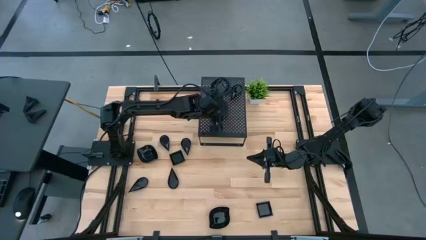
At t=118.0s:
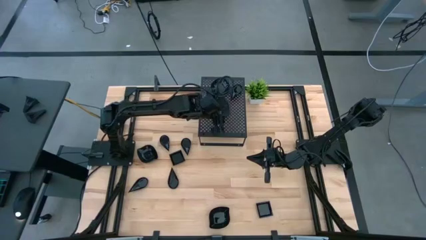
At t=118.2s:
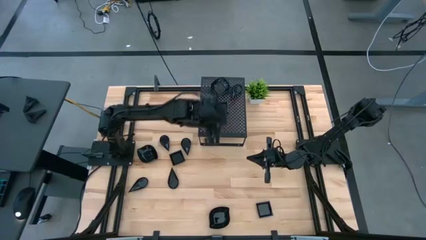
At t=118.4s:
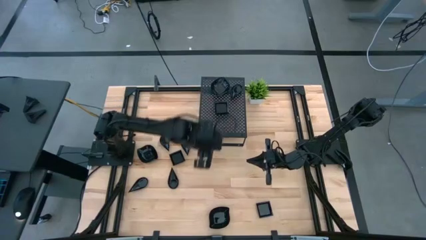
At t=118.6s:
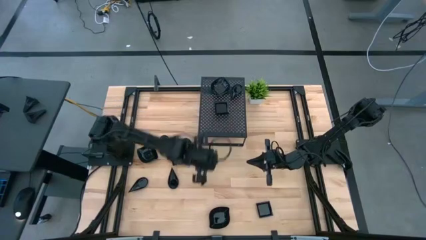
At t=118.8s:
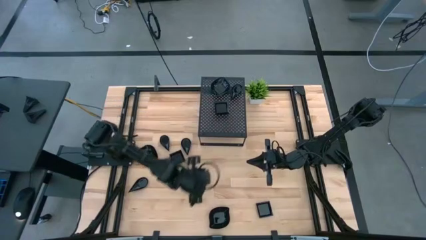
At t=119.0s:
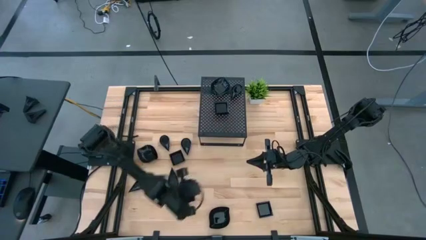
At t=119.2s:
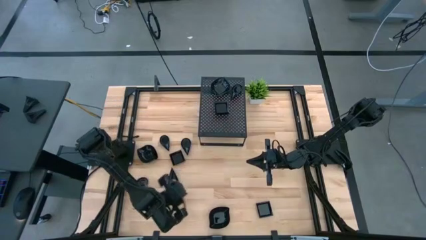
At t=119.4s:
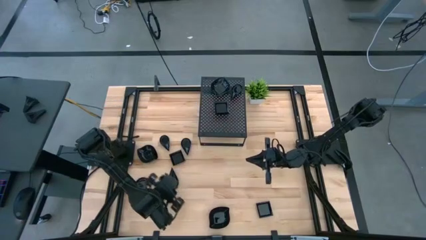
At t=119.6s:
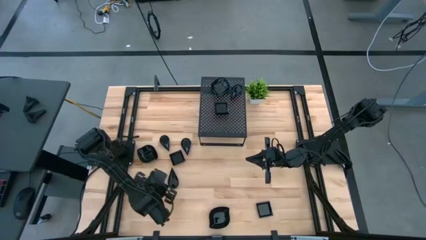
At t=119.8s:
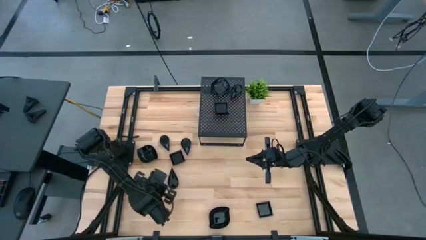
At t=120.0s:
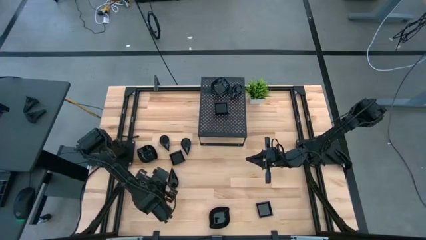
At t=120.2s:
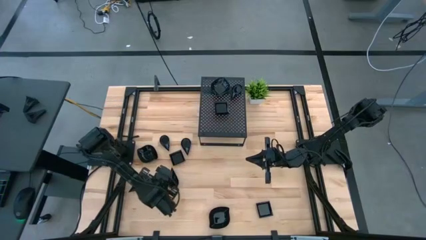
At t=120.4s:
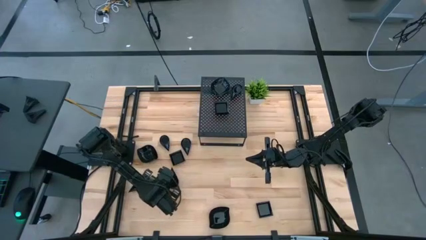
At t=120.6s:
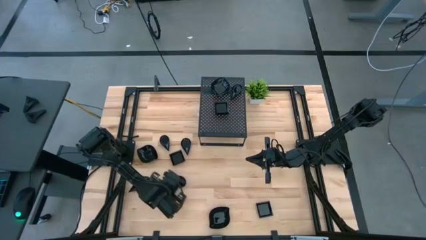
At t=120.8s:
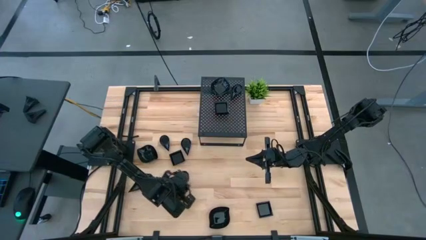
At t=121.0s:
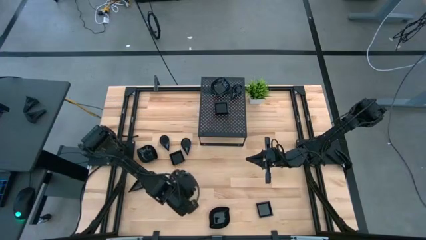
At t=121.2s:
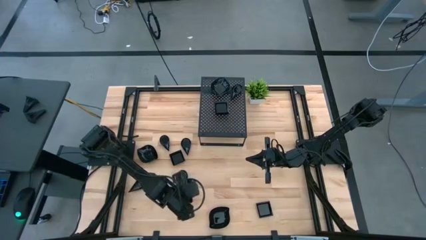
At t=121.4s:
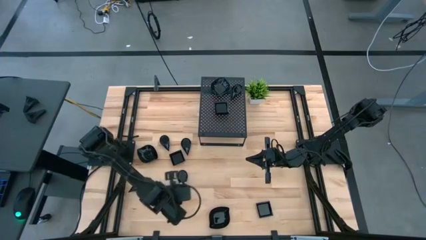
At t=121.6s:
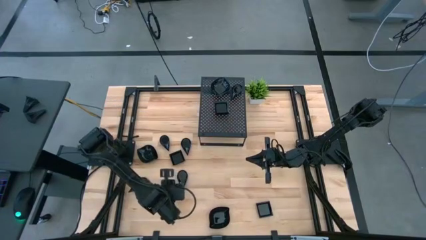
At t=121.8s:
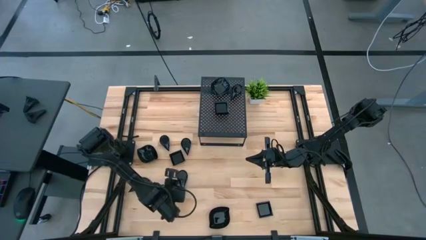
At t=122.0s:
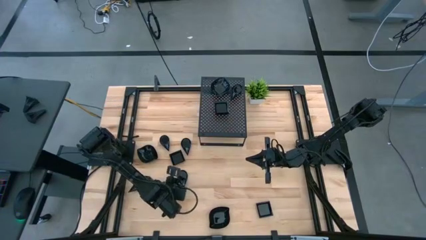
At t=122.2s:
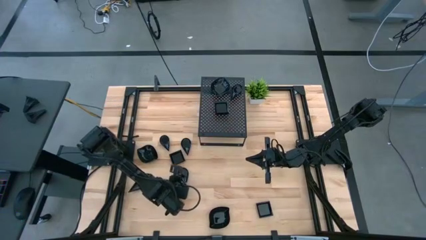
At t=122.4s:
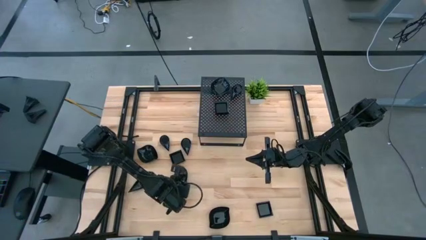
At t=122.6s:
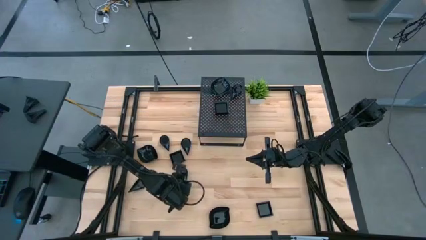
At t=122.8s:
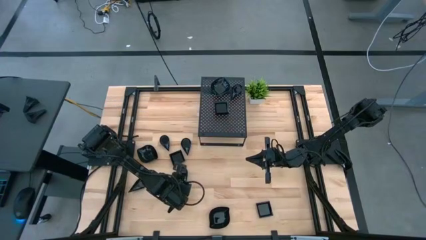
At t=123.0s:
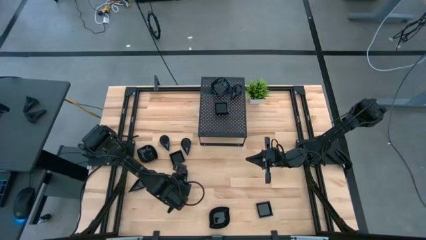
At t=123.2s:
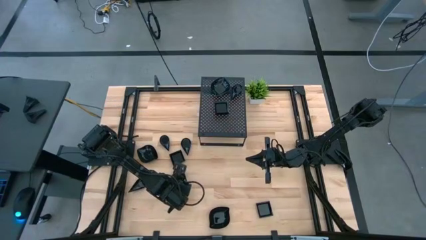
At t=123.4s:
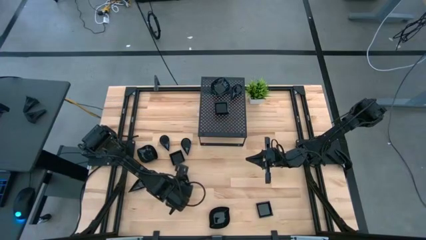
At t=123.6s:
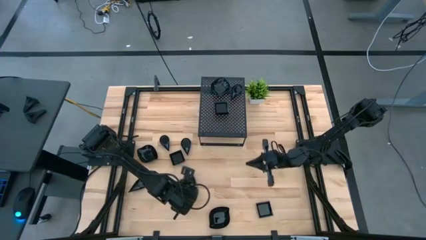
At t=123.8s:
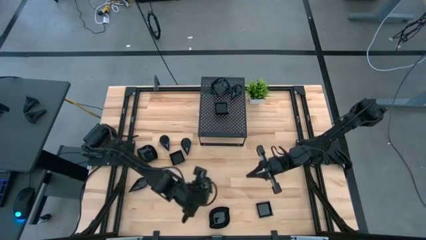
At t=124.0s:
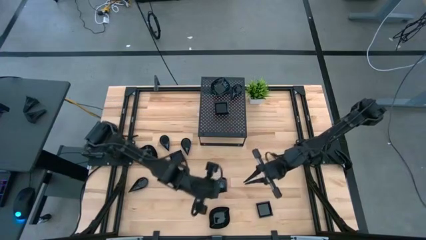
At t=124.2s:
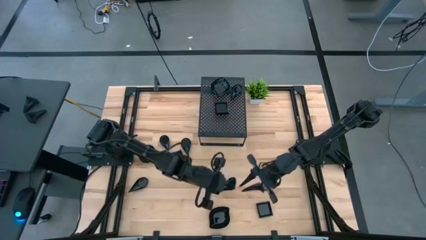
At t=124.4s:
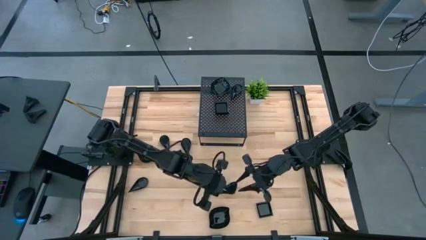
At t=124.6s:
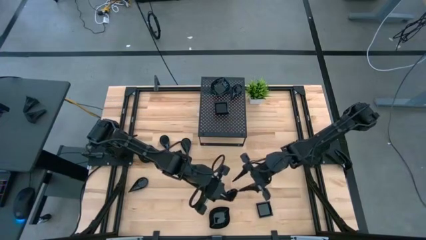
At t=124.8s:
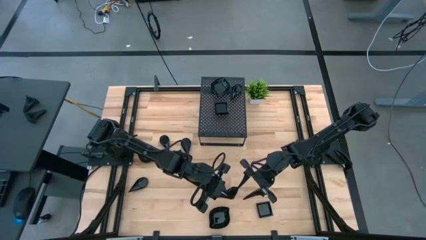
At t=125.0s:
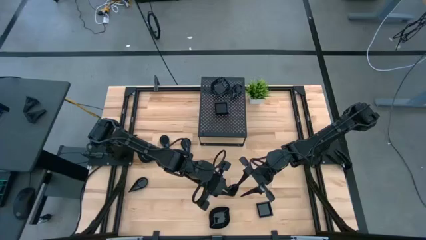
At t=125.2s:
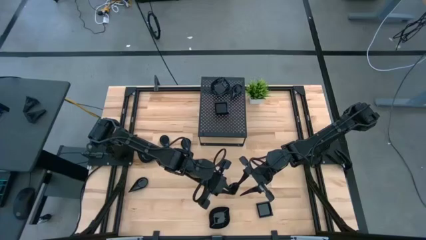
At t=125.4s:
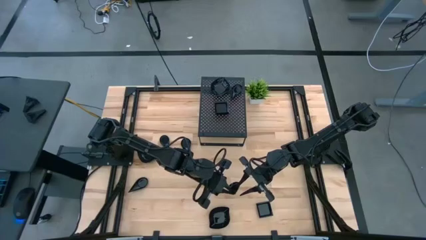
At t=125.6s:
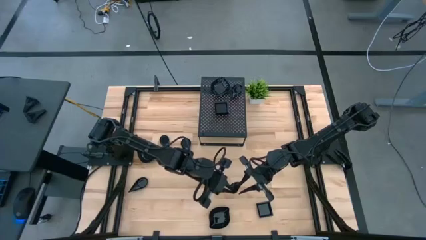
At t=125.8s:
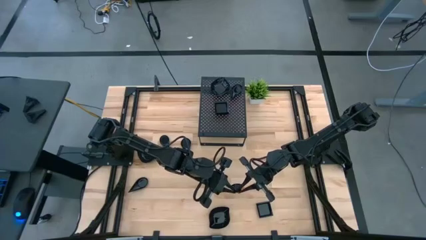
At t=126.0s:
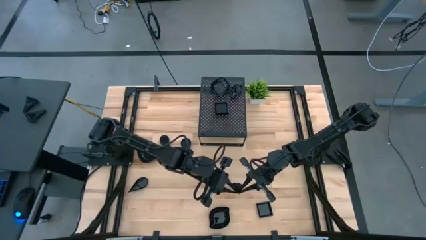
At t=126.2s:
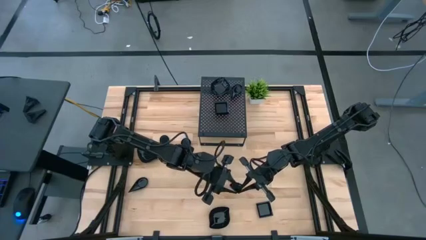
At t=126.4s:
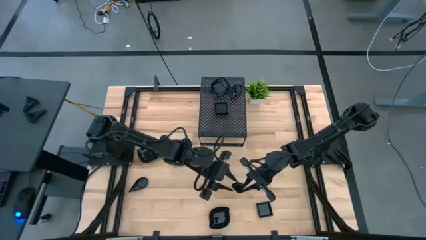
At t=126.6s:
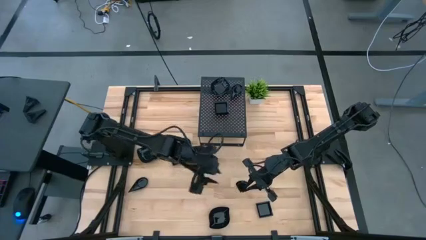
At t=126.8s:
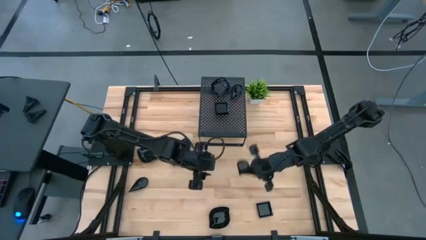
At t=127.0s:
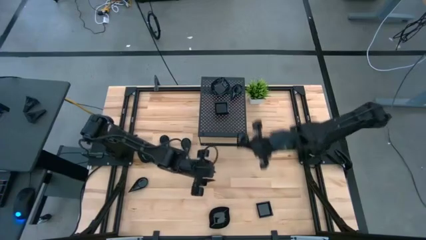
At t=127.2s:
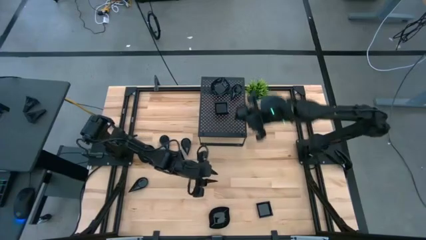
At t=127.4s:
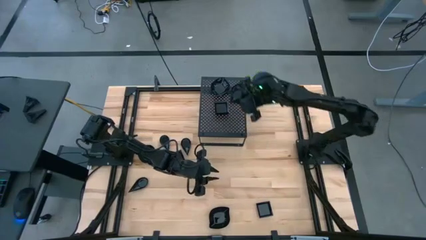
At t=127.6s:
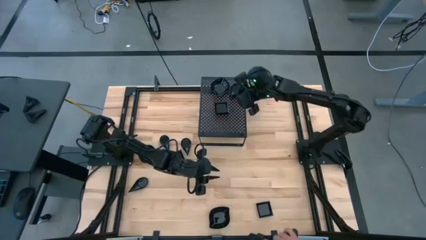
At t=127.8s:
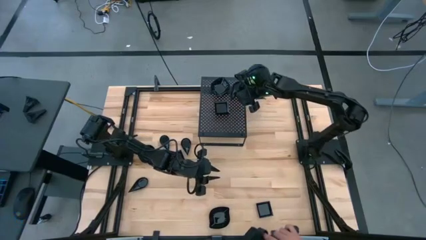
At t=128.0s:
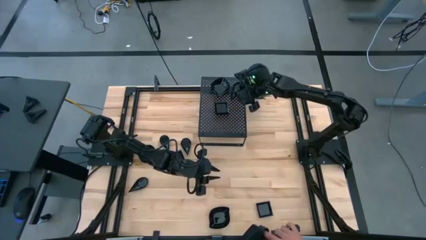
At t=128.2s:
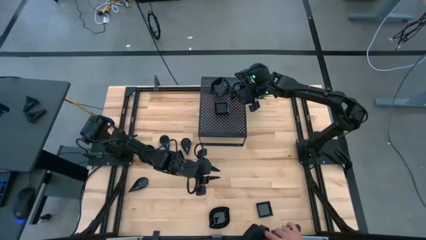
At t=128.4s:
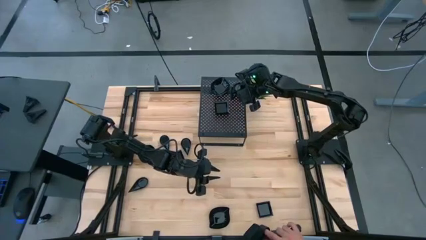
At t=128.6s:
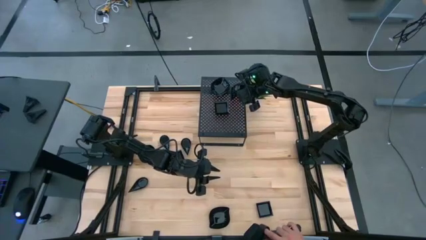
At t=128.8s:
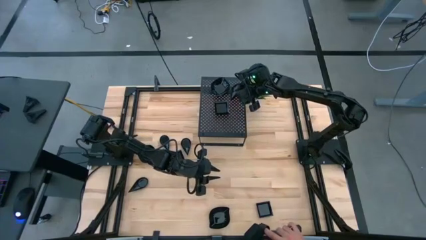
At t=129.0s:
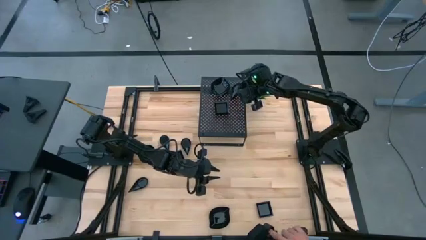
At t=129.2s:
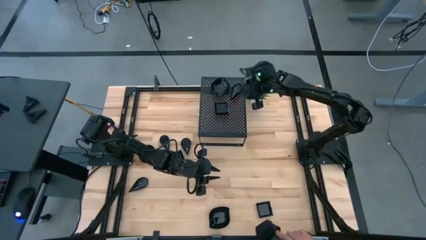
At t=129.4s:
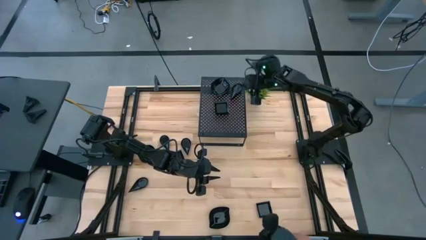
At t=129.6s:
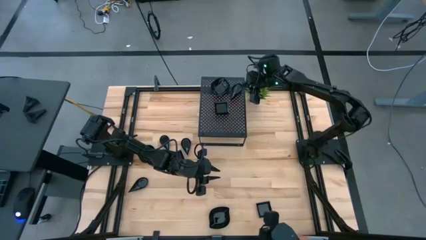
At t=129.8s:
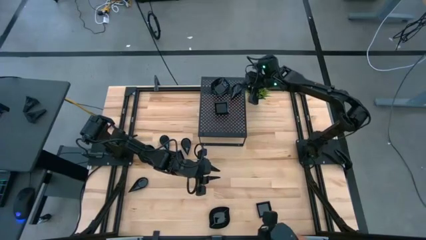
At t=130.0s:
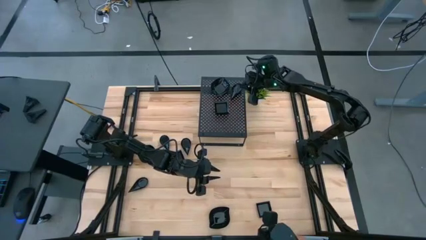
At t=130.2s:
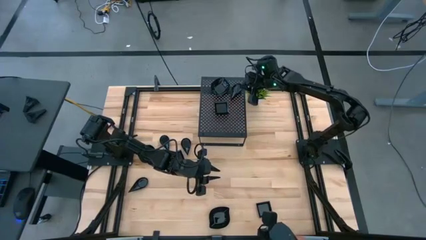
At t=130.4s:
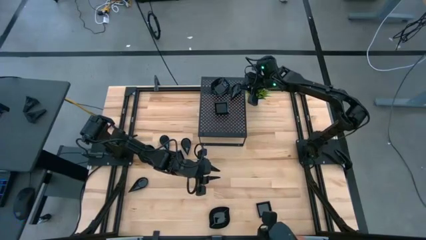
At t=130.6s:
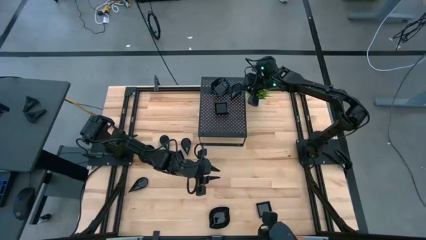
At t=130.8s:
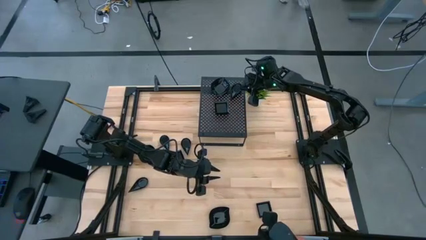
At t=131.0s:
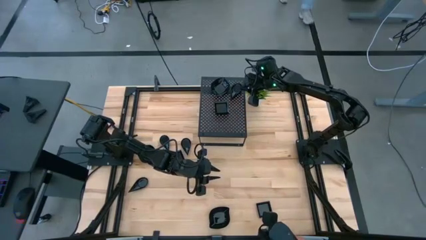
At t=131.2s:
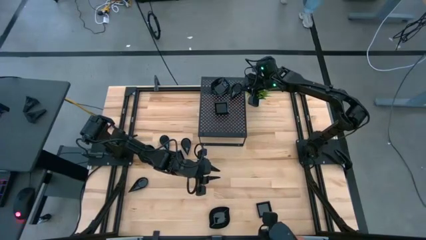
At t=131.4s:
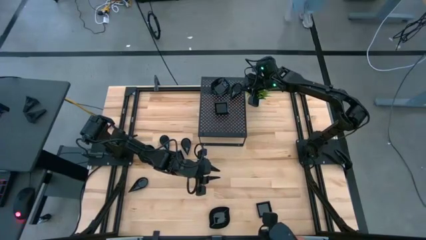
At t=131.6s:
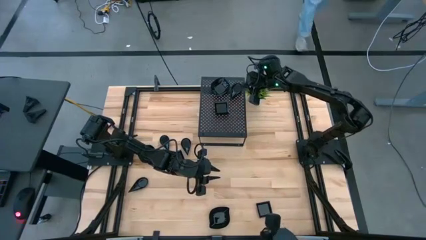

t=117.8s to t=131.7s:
Task: Pick & Place Mini shaped plates
Stack the black drop-shaped plate on top of the black drop-shaped plate on the shelf
